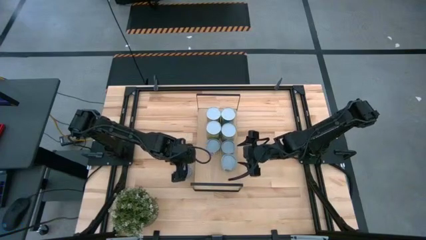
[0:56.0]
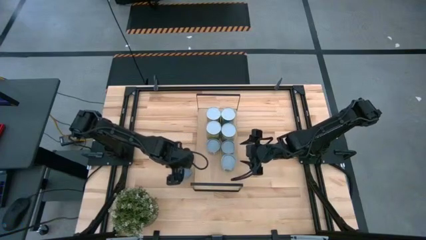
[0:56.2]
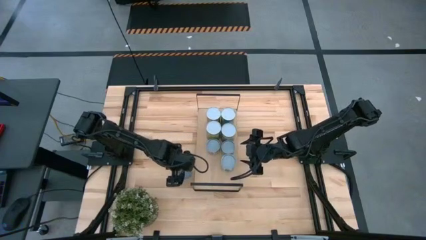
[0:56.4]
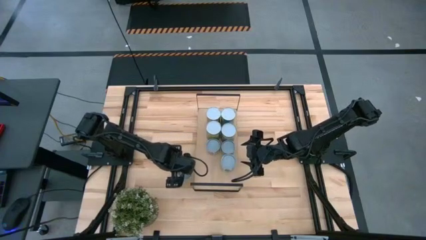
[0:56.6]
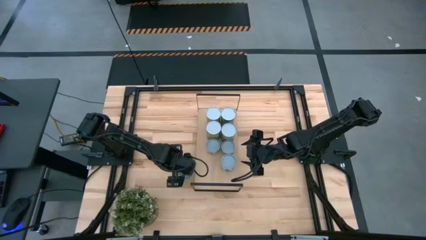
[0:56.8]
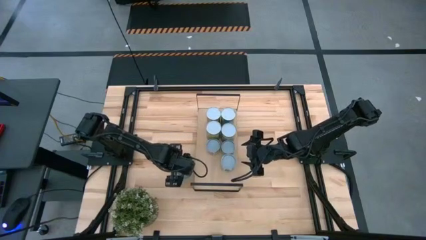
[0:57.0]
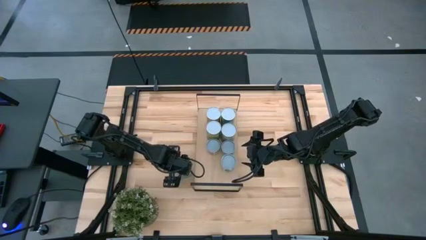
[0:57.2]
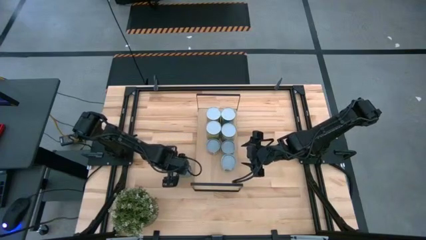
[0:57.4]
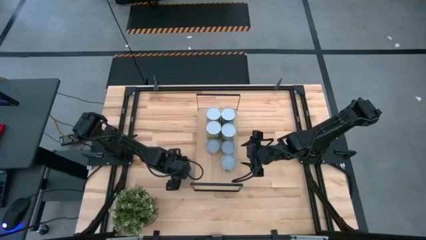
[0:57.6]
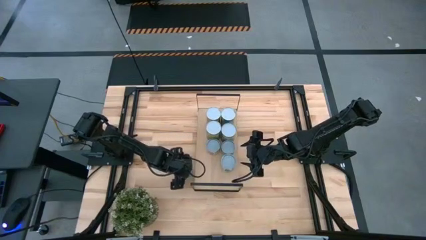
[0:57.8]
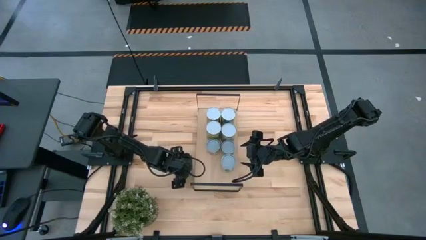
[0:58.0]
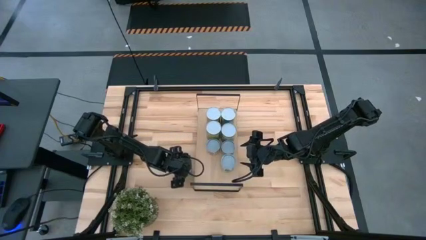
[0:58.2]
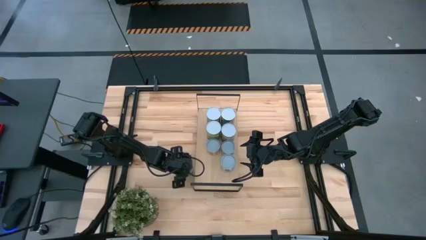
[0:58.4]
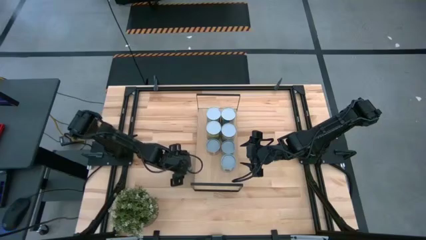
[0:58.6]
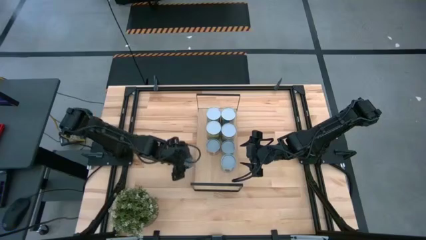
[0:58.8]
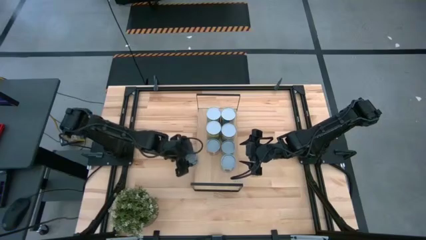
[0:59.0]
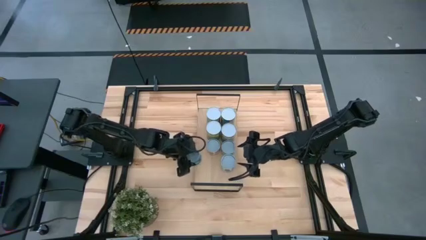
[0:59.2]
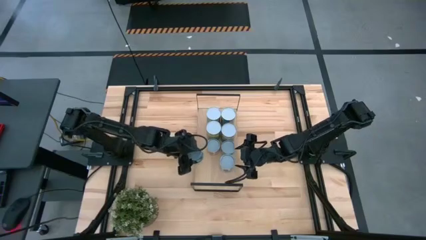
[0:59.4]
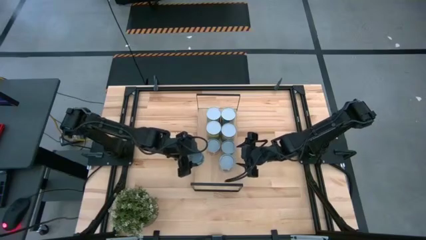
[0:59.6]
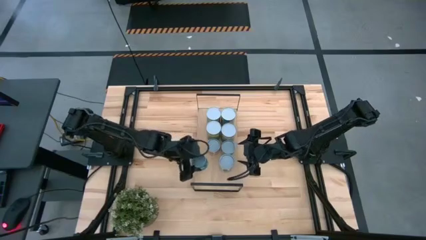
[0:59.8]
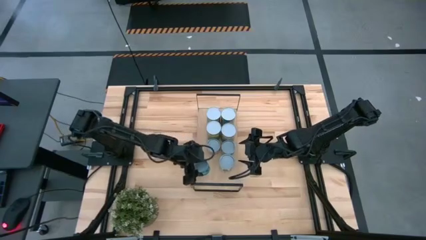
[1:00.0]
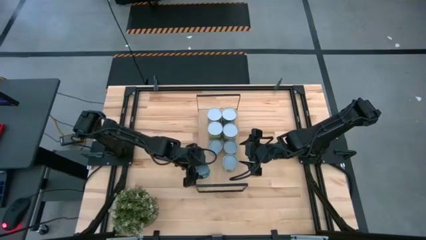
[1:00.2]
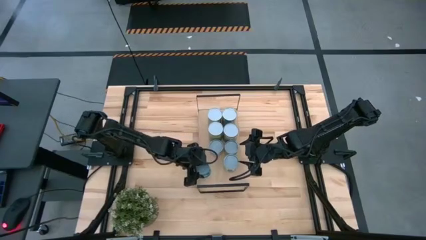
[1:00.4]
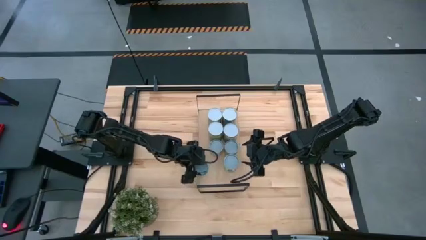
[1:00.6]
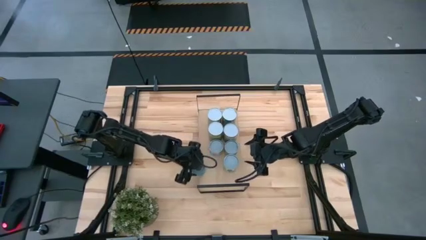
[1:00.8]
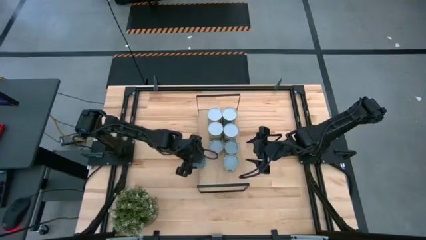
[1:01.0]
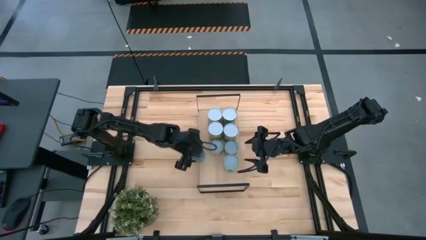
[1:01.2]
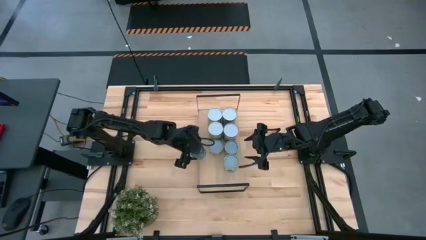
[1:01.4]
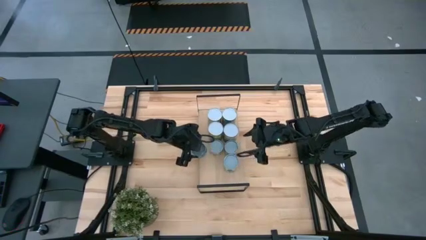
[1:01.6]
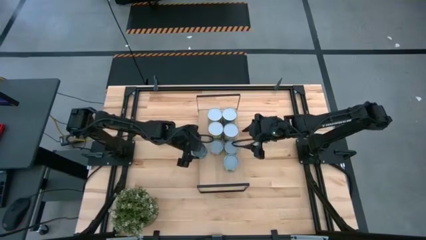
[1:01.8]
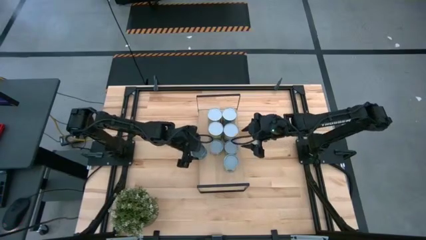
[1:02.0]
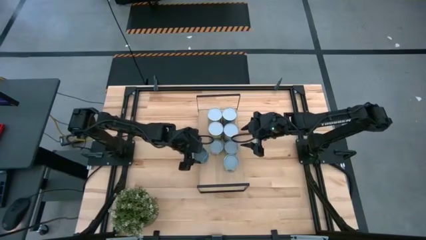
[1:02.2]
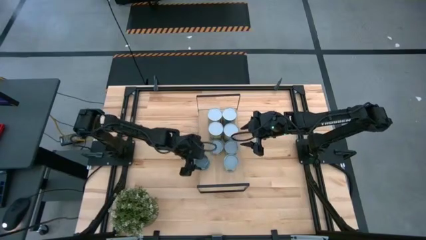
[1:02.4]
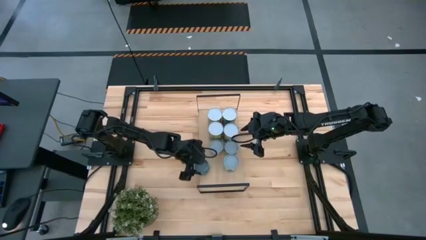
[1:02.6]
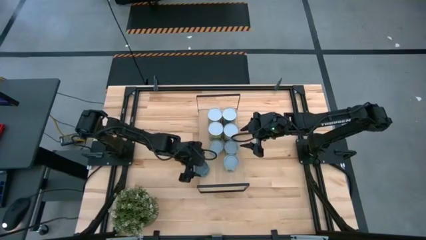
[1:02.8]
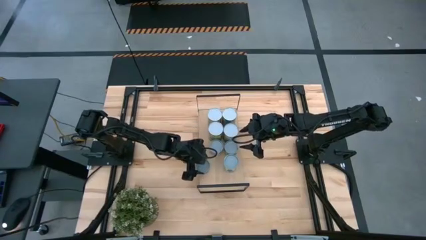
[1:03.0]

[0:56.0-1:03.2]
Task: Pick and place cans onto a shelf
Put the canned tuna on the shelf

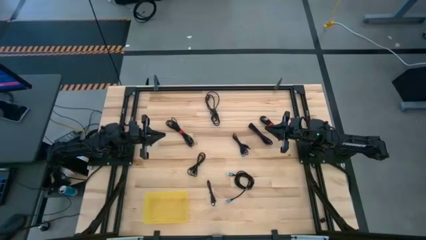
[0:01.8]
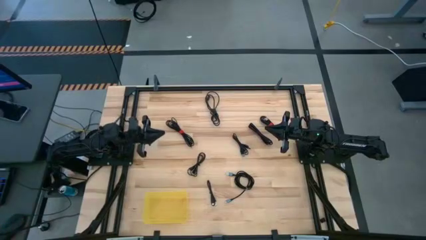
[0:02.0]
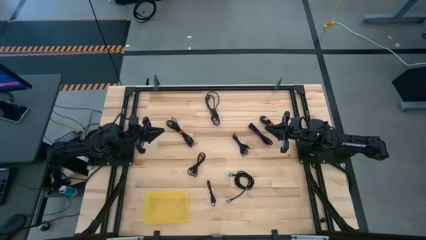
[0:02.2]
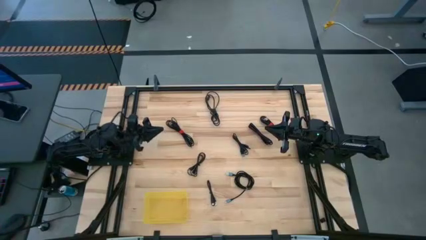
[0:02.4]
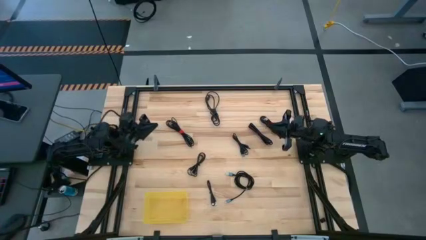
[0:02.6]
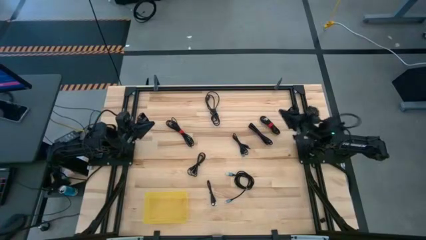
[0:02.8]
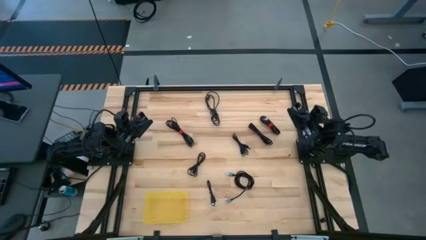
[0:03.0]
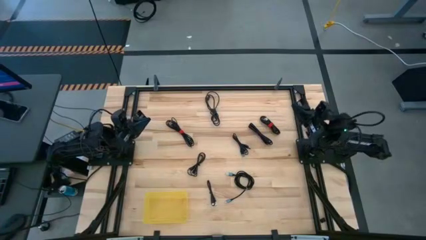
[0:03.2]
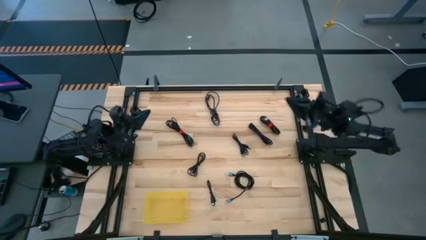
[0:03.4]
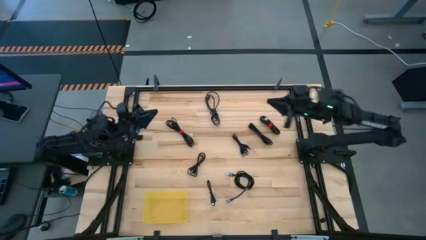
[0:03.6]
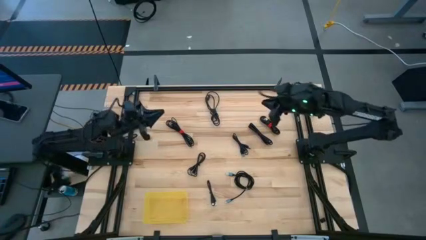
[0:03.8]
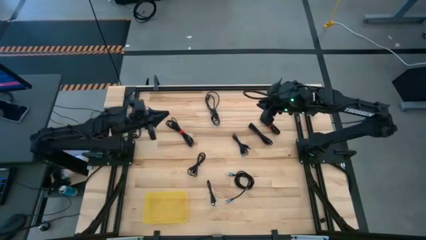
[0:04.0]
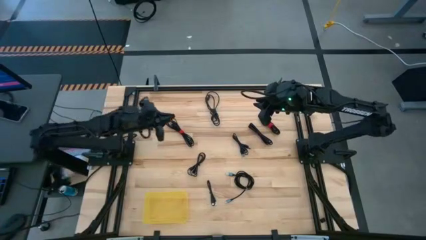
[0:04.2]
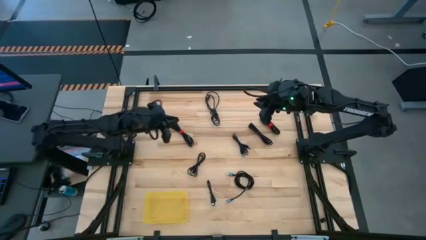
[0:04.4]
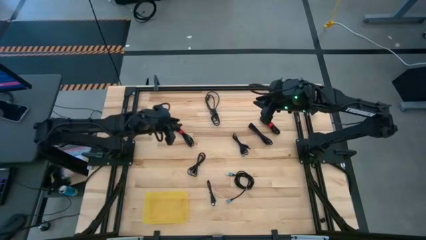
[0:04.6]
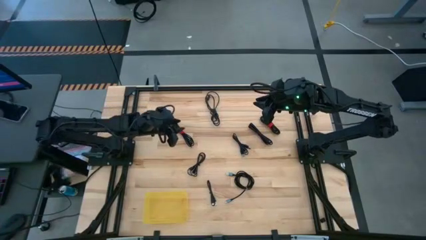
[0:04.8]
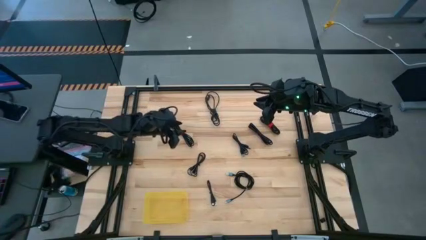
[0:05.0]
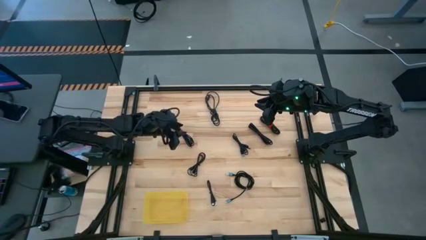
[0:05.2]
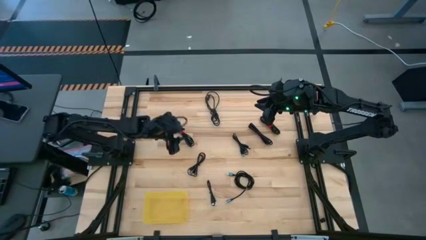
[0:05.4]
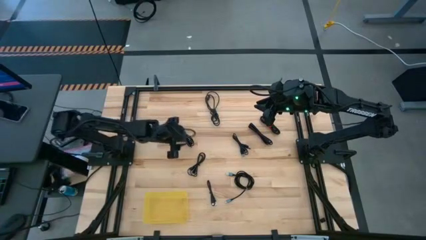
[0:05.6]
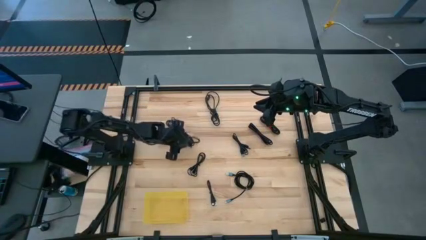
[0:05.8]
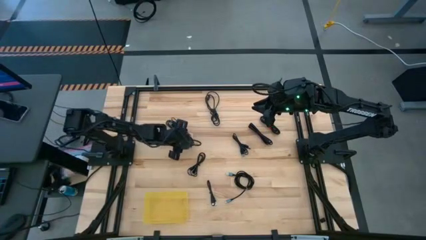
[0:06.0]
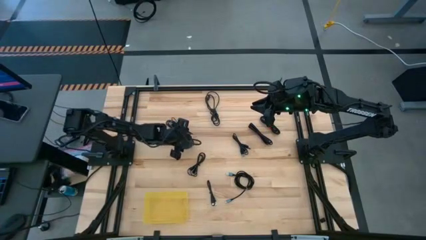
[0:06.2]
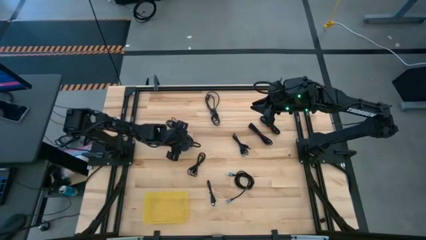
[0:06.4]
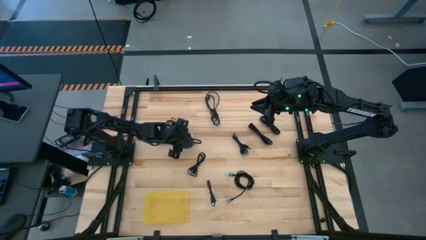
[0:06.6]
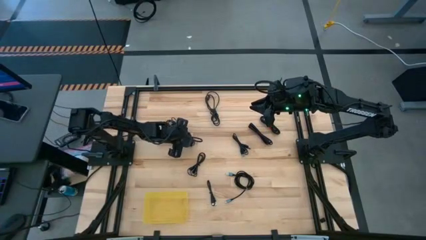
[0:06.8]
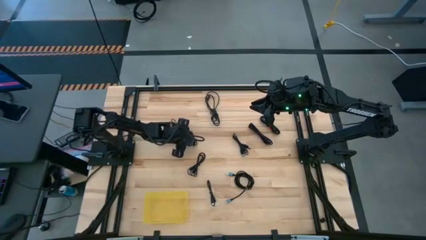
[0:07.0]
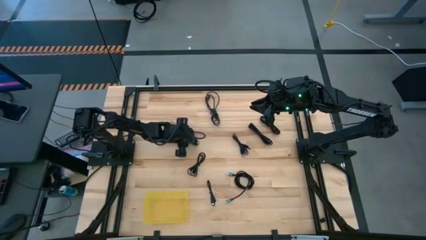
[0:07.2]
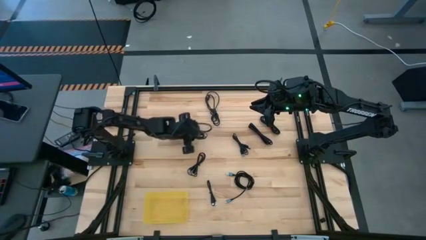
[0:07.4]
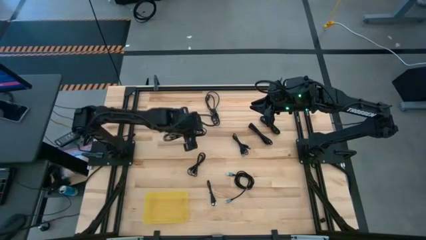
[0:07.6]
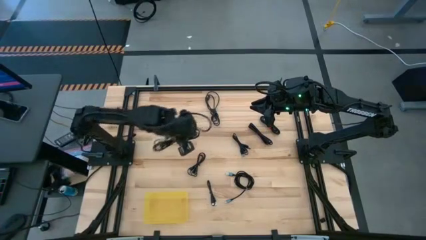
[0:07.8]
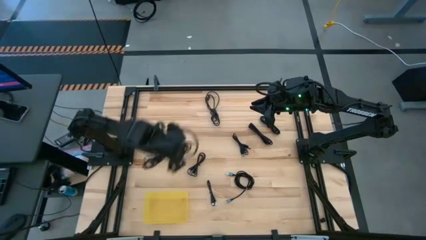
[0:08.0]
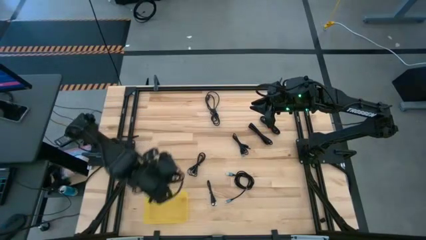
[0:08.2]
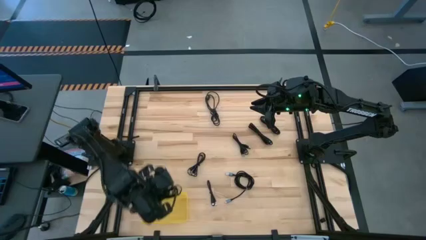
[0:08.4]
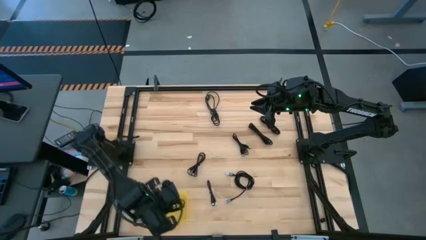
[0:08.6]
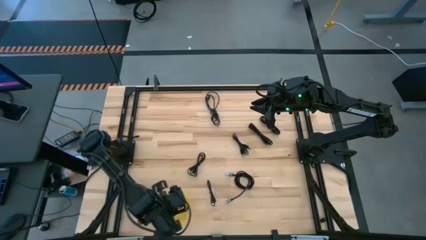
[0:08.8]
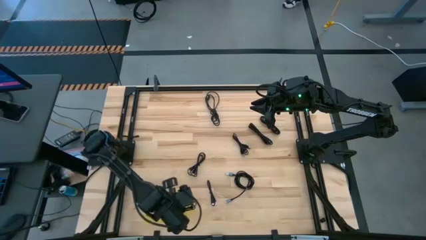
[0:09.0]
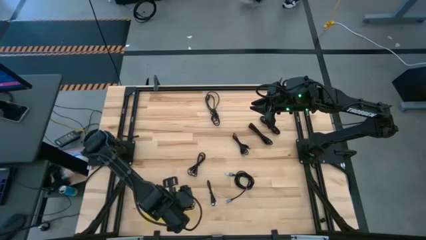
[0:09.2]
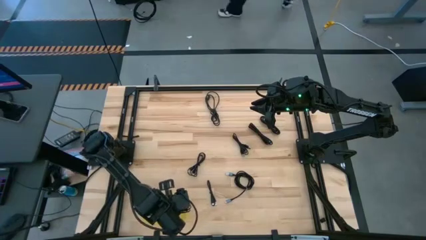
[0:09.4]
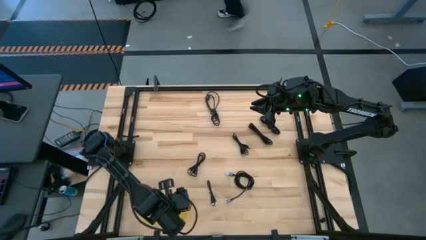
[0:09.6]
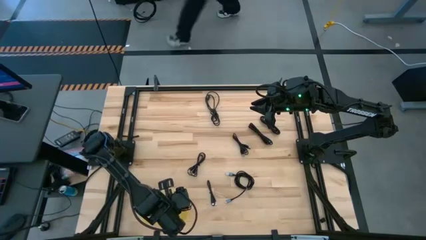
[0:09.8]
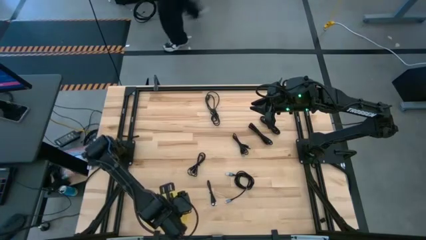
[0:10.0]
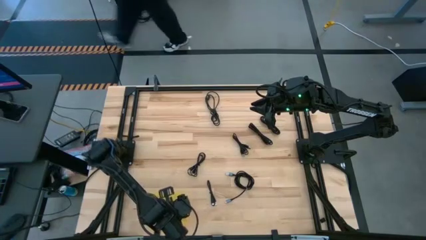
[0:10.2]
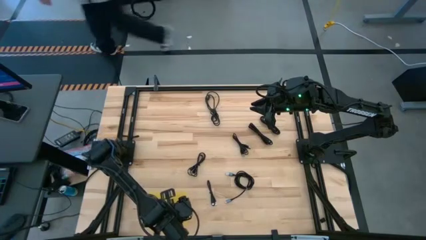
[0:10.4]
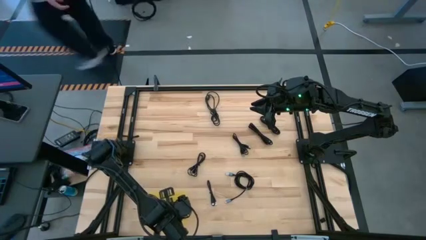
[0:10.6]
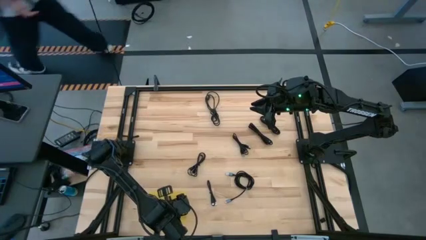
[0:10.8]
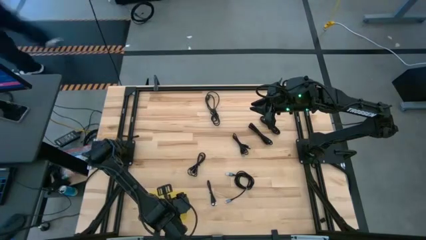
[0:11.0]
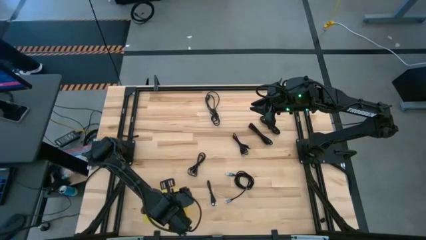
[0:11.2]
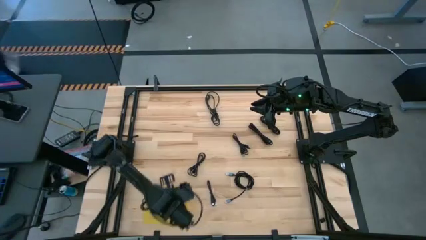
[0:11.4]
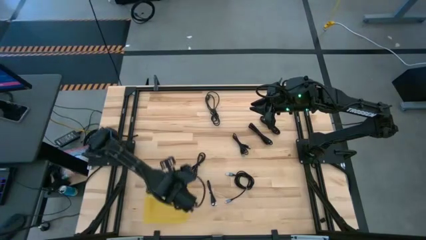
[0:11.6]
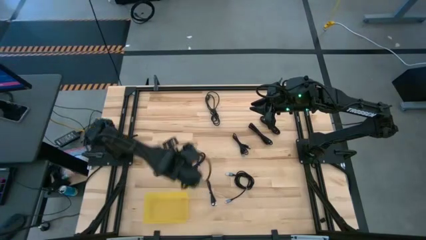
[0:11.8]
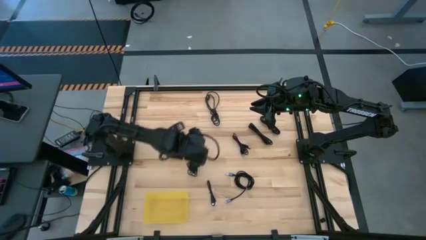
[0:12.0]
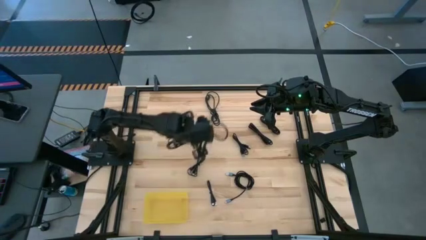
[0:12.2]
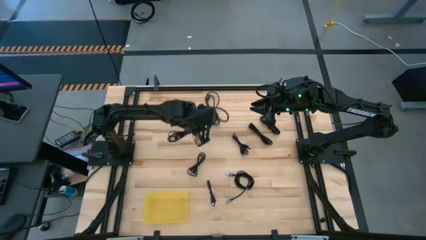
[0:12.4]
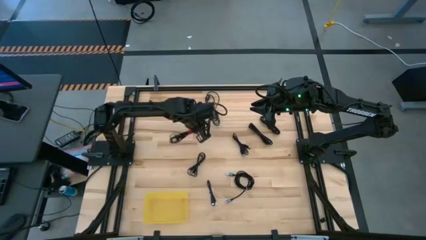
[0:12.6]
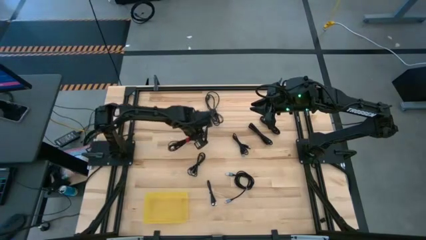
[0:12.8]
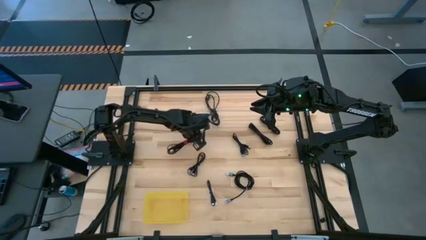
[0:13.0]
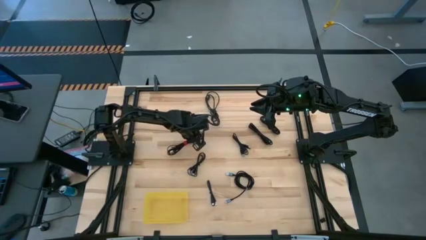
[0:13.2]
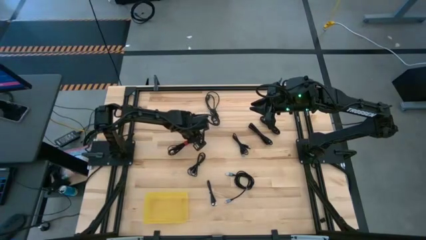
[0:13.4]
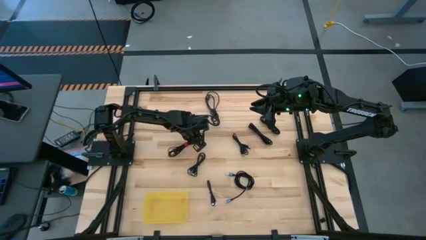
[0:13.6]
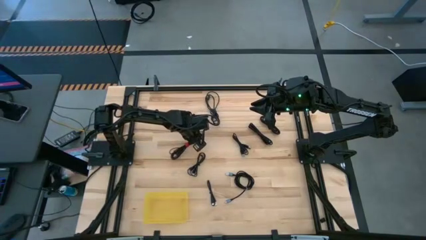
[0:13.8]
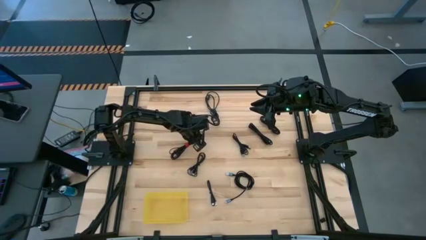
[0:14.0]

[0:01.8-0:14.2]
Task: Pick and place USB-C Cables
Put the black charger cable into the yellow bin
